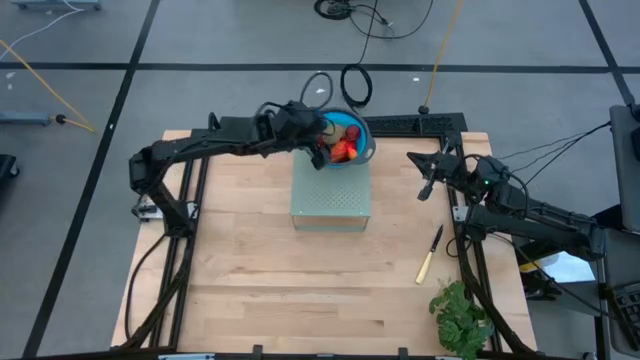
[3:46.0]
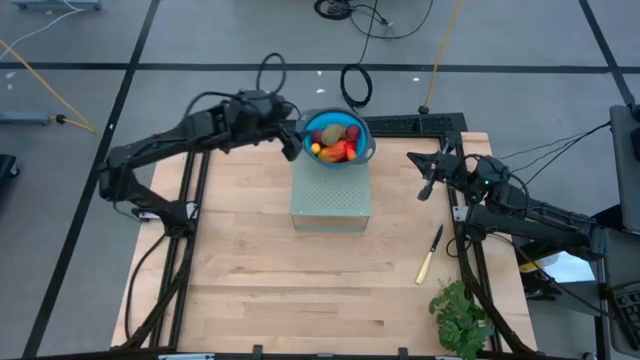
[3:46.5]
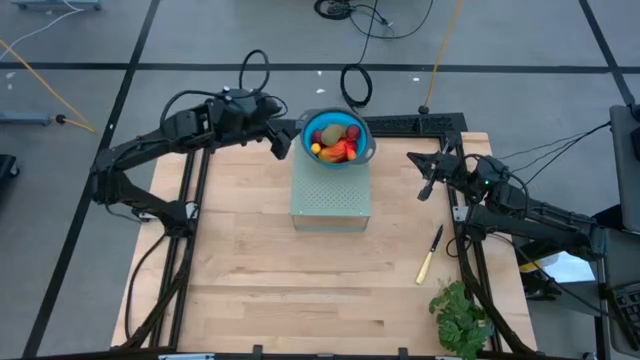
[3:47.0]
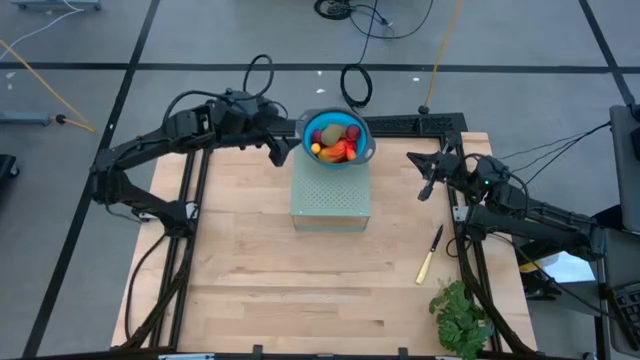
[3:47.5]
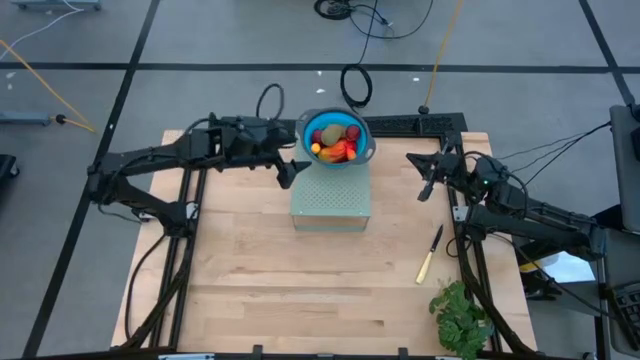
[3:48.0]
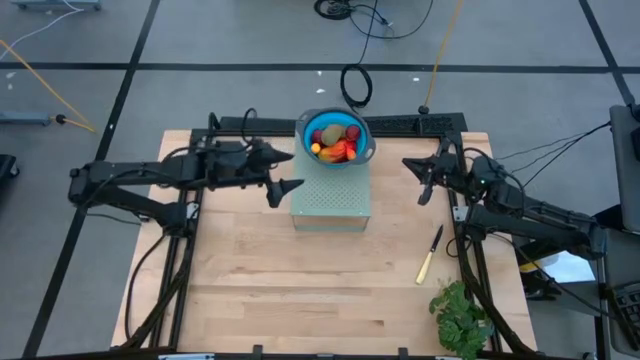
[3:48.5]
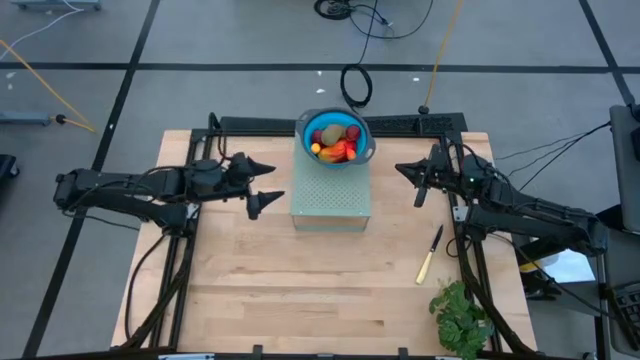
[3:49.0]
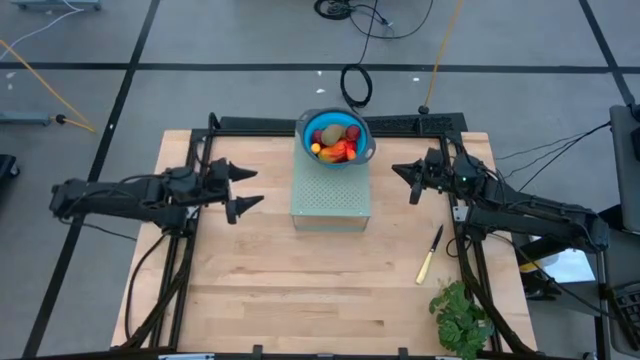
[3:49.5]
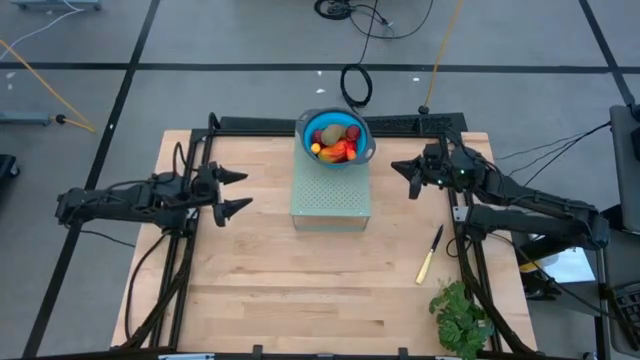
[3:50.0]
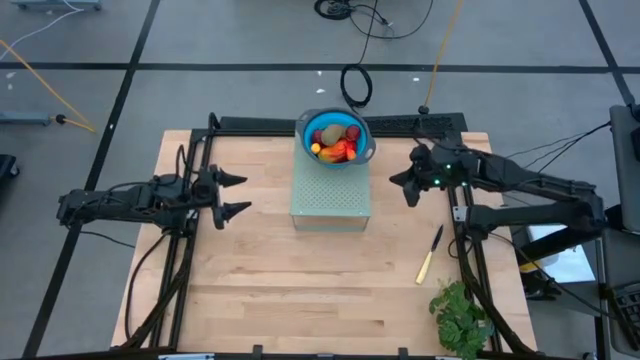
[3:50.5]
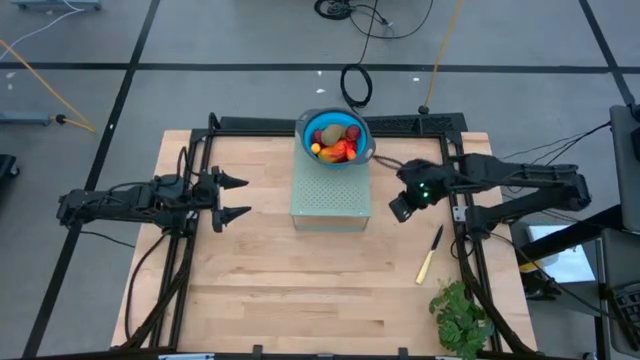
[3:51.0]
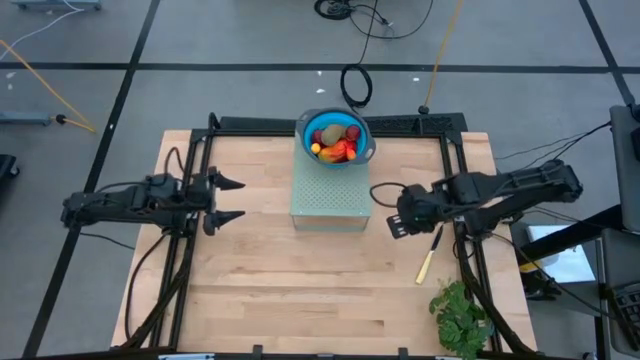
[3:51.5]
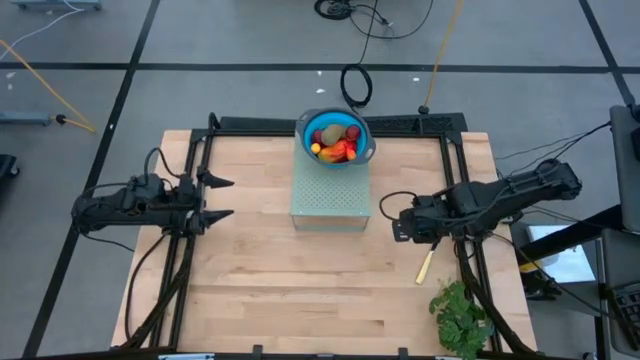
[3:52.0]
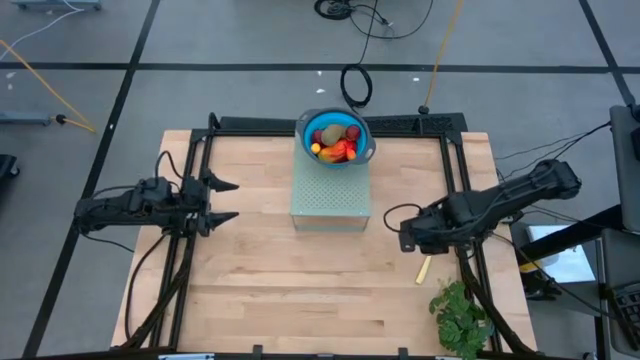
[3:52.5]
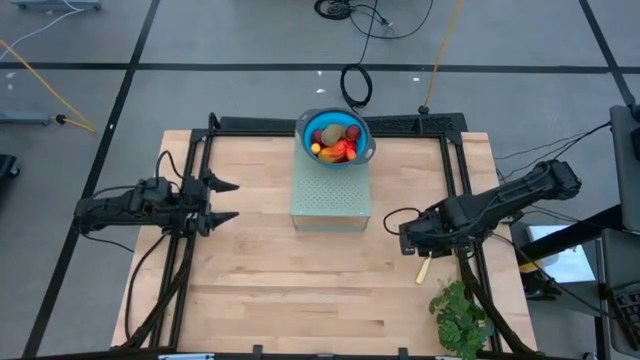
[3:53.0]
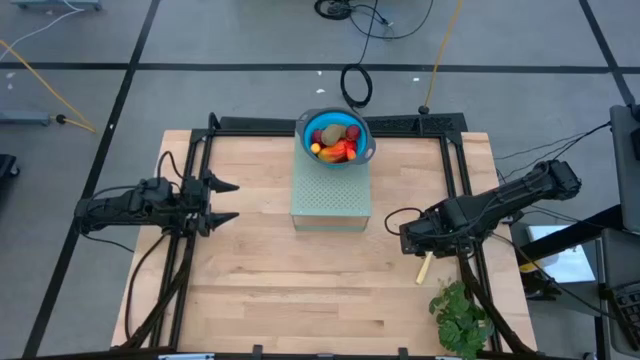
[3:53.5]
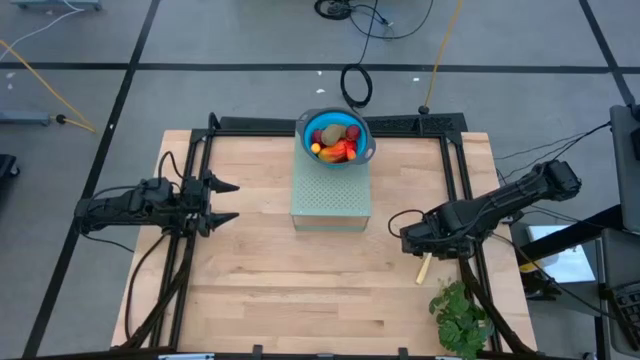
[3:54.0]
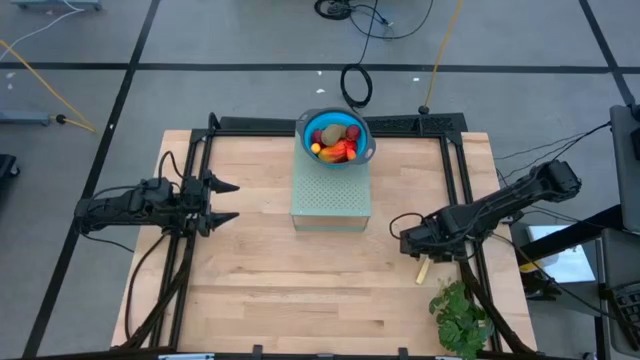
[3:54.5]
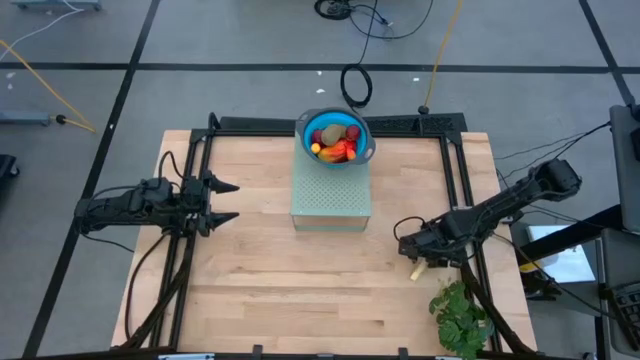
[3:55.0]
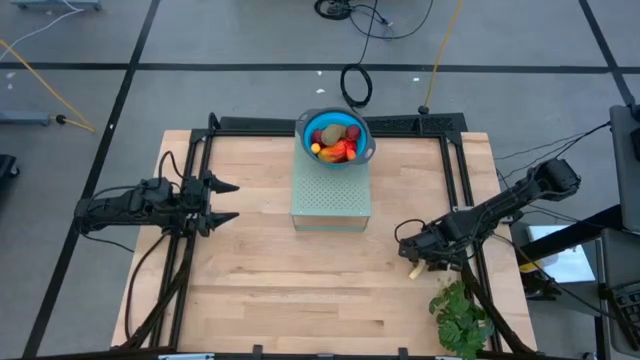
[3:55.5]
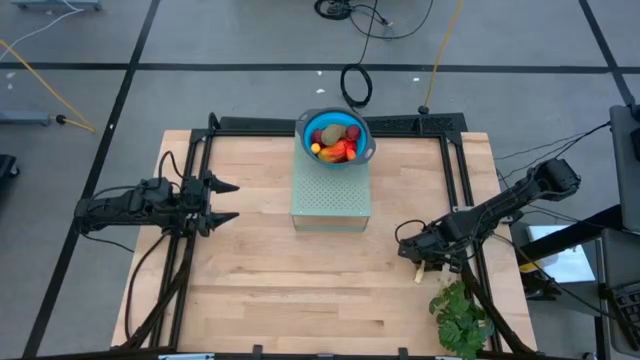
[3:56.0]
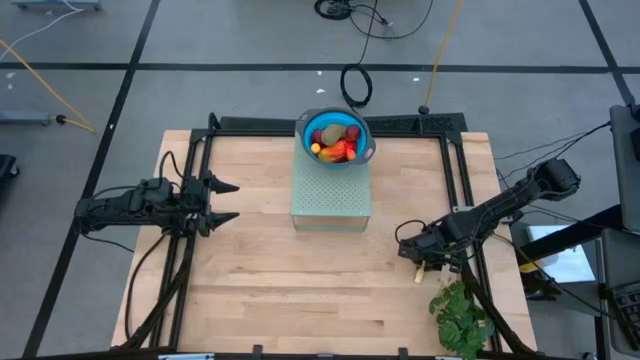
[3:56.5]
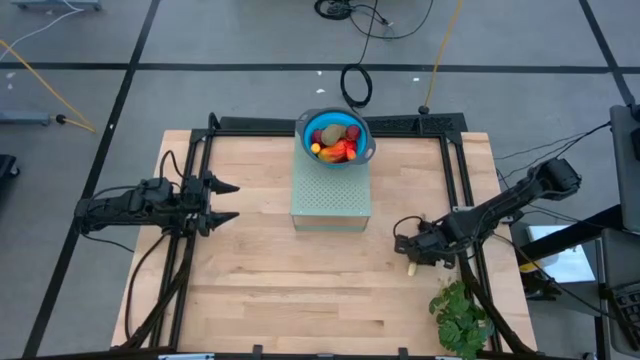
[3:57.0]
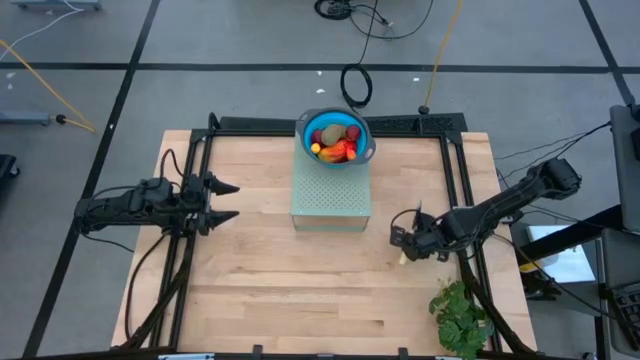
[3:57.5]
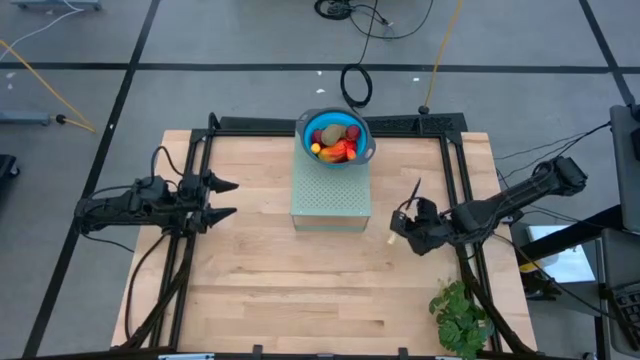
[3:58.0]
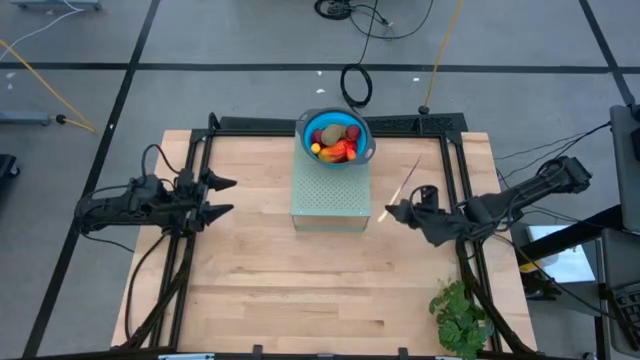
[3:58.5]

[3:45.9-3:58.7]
Task: Pick & Place Fruit
Put the kitchen knife on the shelf

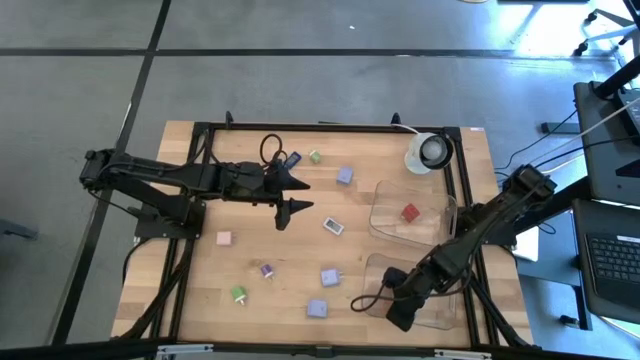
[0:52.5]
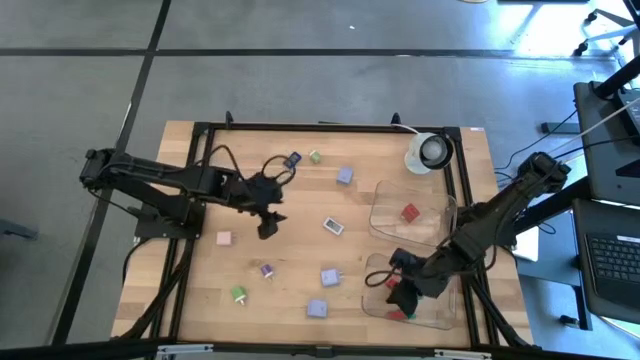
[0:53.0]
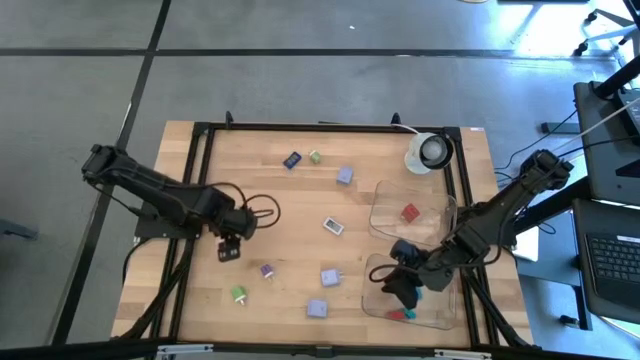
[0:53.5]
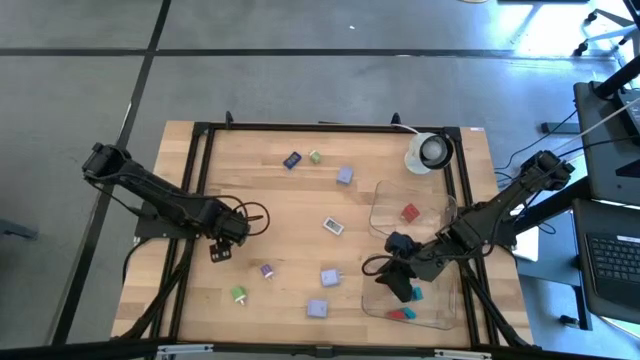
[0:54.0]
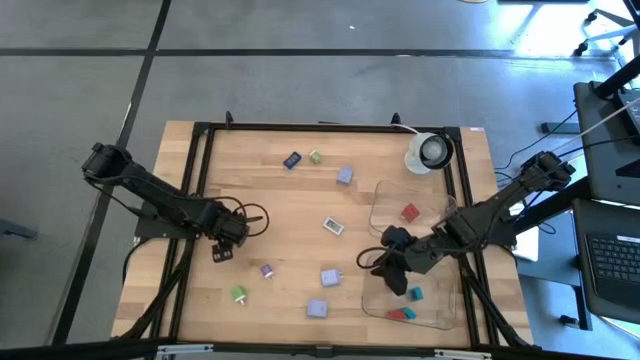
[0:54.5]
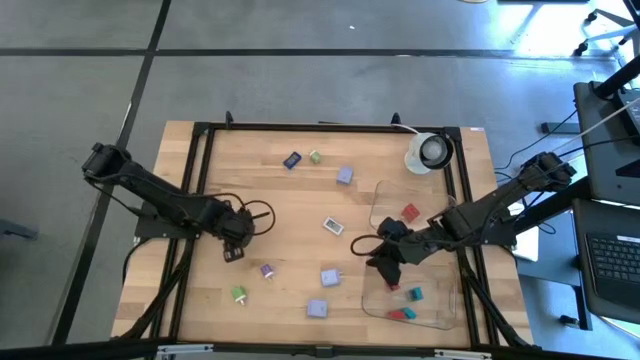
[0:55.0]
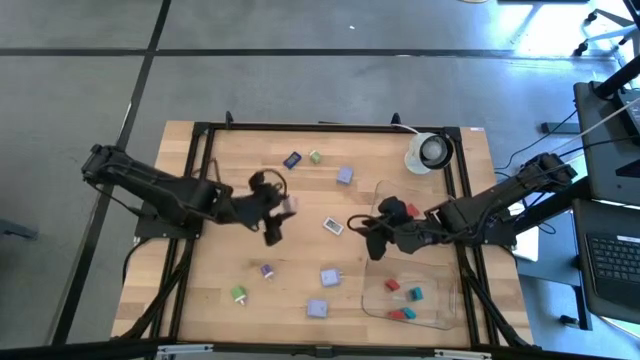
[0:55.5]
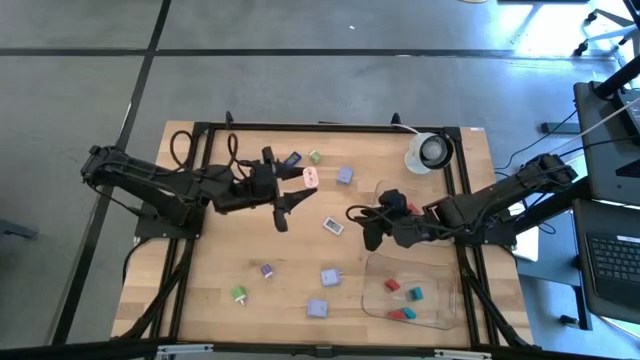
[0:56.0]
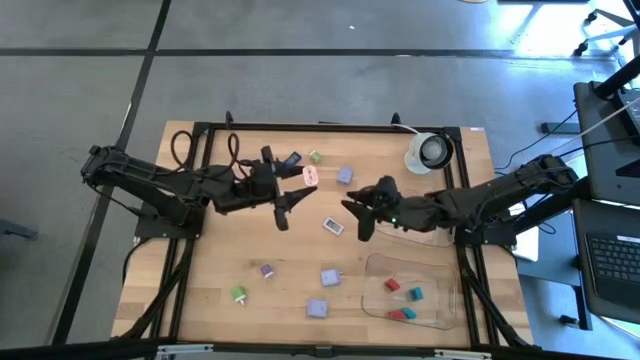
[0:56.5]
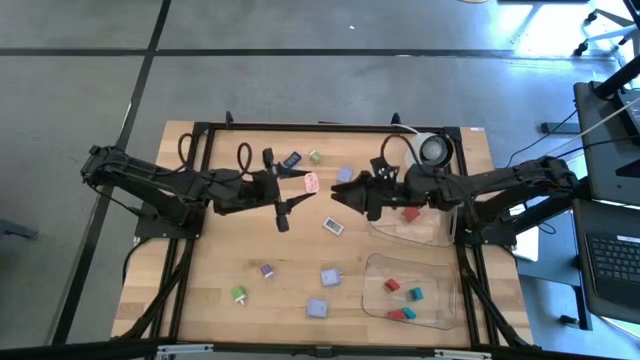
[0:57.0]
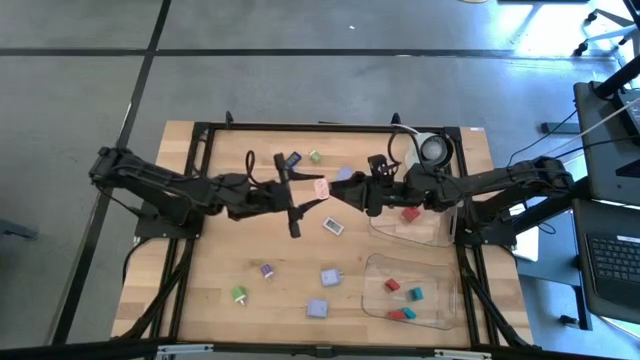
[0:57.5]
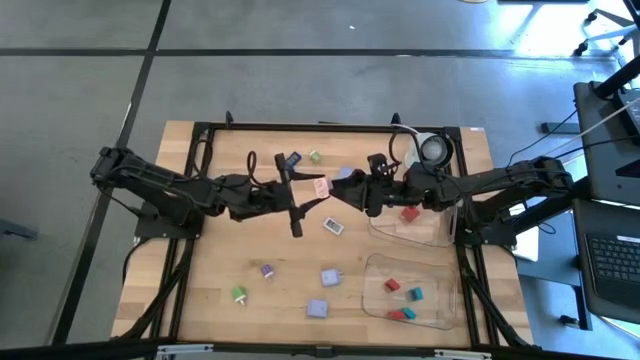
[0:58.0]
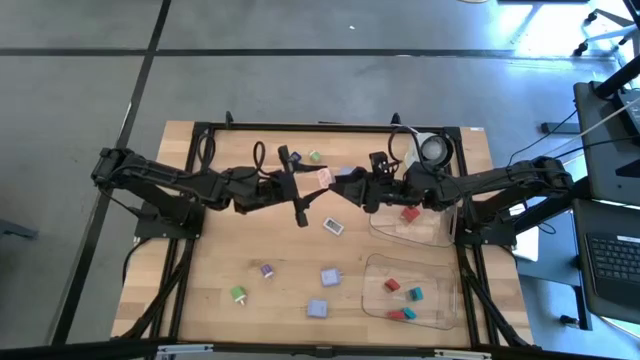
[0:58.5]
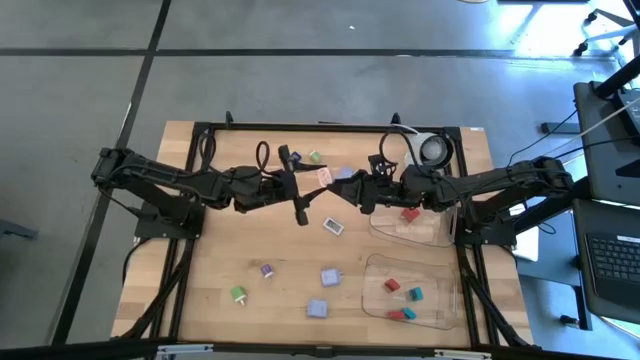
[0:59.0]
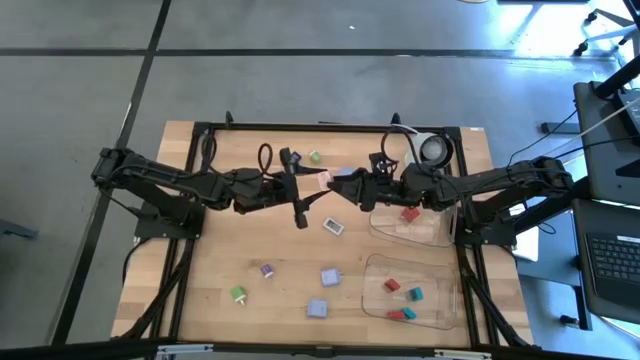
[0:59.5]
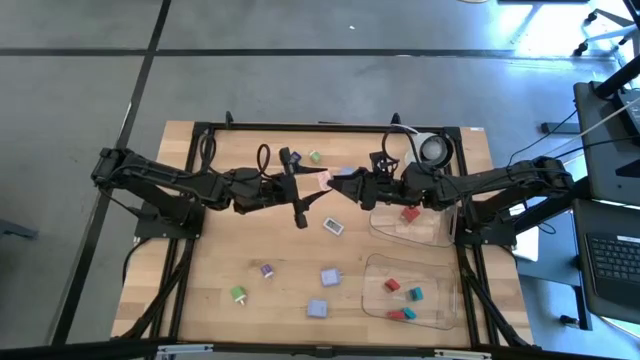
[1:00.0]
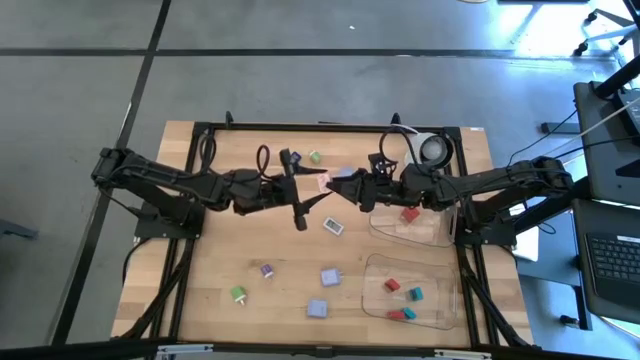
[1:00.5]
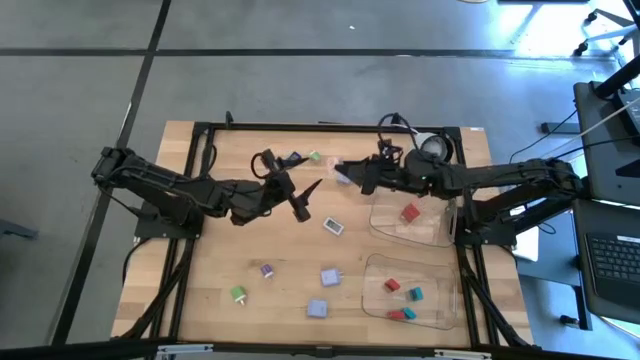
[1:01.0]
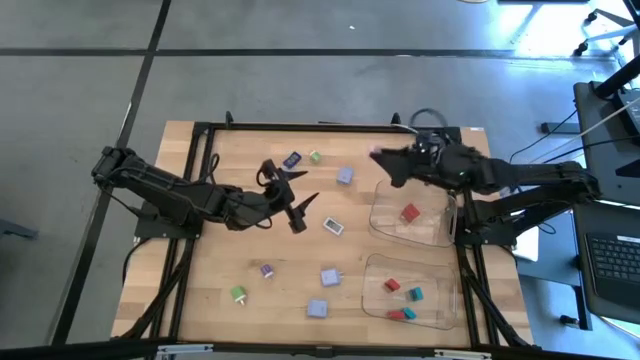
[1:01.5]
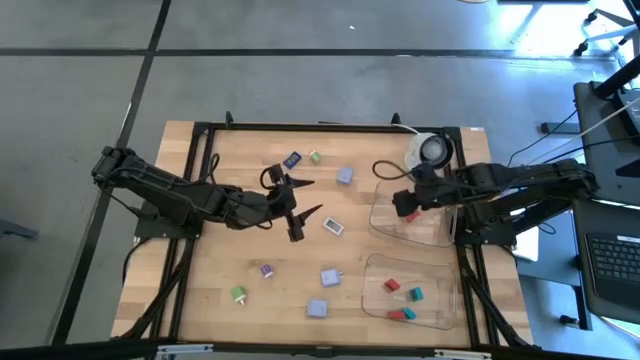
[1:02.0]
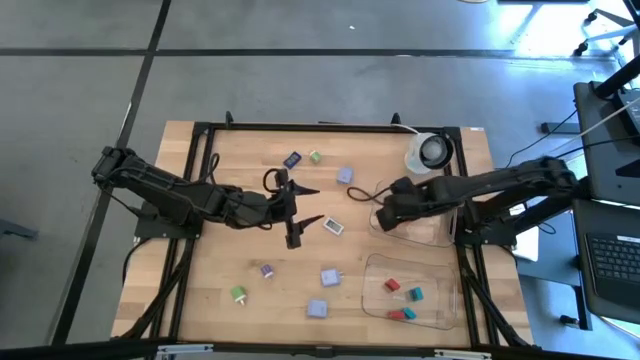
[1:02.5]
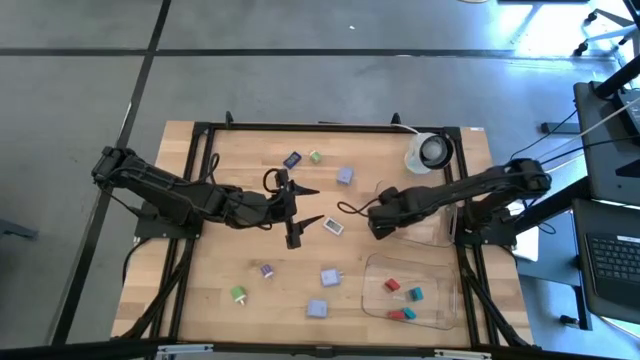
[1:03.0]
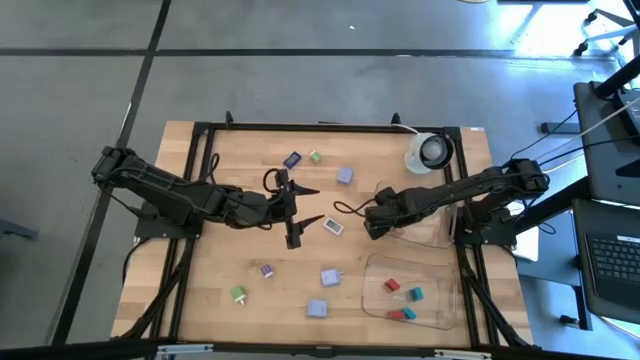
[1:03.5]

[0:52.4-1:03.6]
Task: Pick & Place Office items
Put the white charger adapter into the top transparent bin
